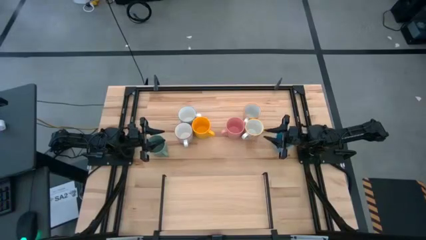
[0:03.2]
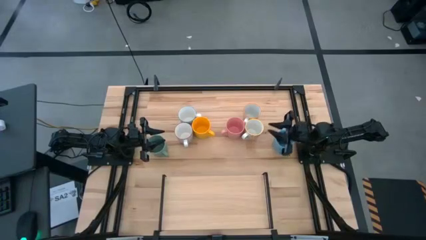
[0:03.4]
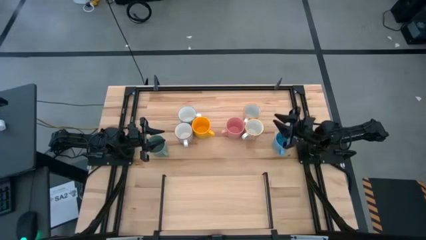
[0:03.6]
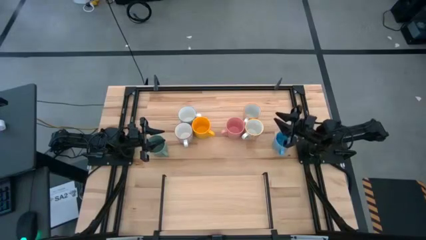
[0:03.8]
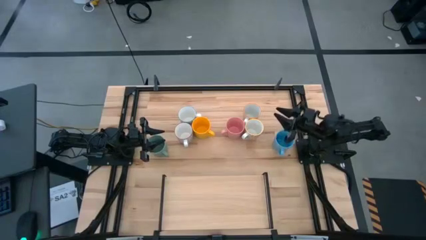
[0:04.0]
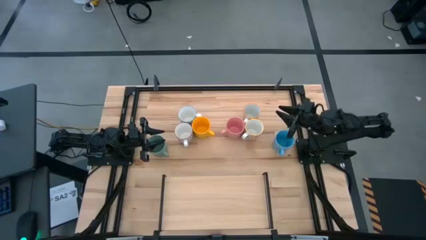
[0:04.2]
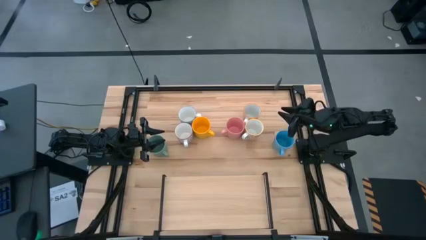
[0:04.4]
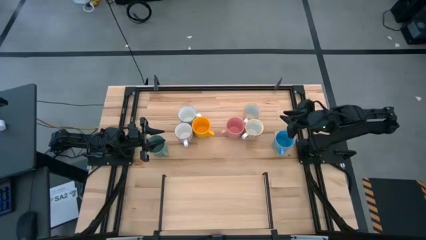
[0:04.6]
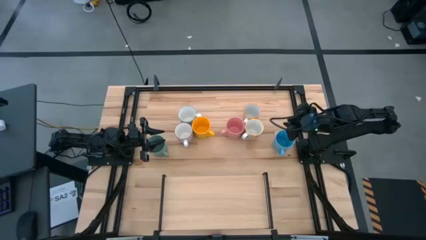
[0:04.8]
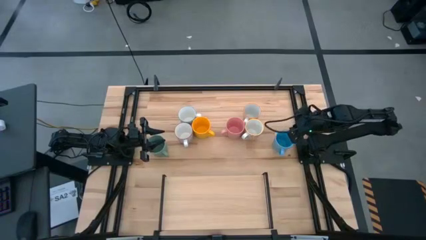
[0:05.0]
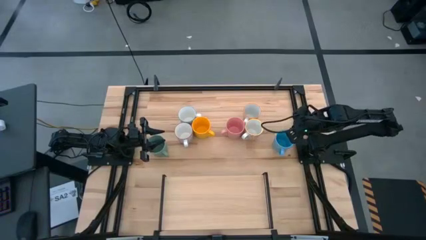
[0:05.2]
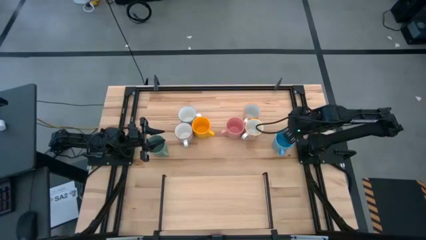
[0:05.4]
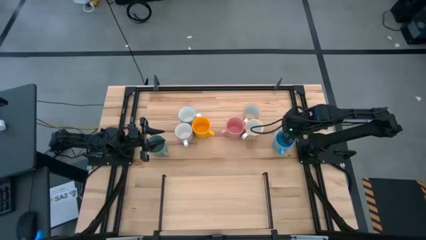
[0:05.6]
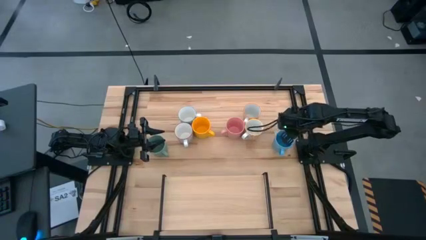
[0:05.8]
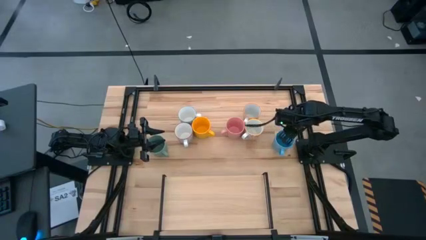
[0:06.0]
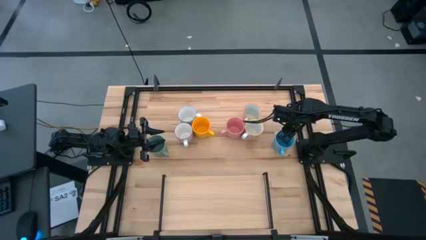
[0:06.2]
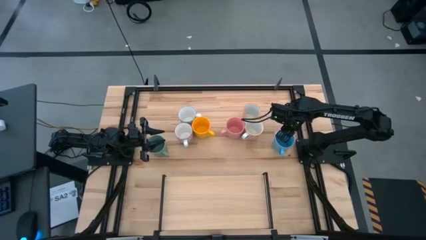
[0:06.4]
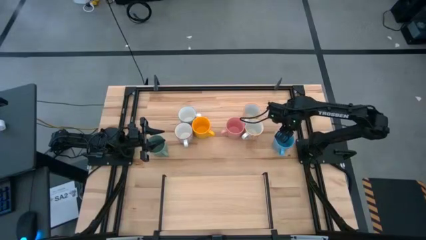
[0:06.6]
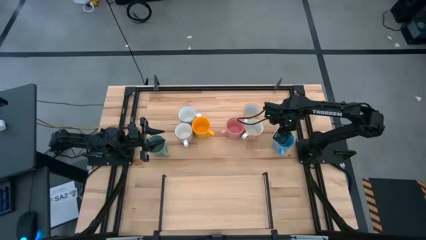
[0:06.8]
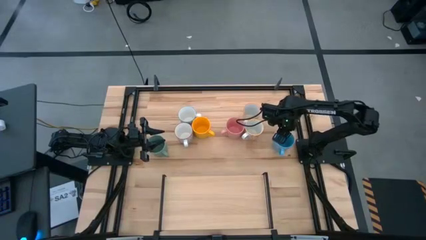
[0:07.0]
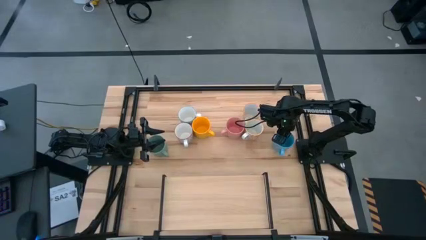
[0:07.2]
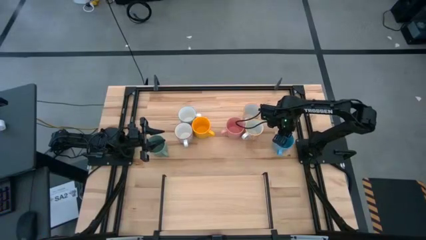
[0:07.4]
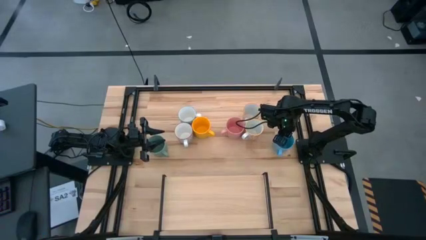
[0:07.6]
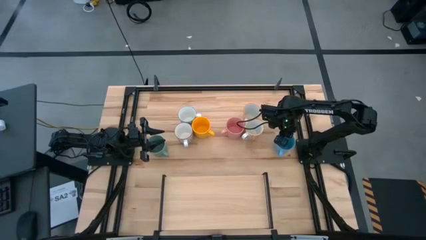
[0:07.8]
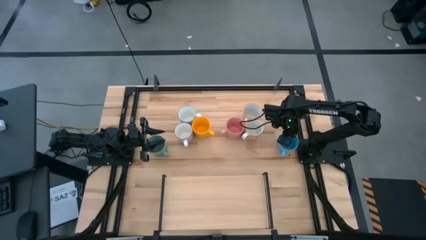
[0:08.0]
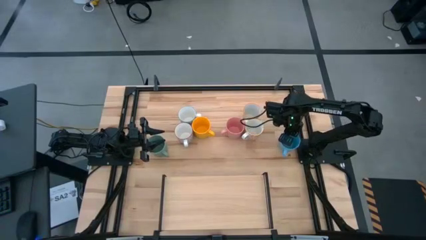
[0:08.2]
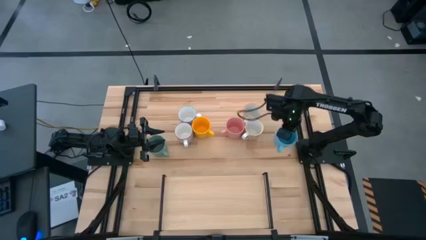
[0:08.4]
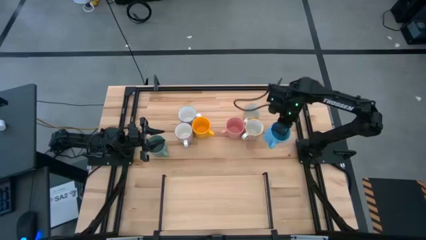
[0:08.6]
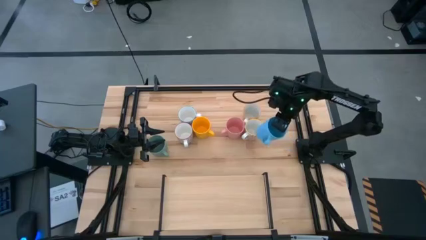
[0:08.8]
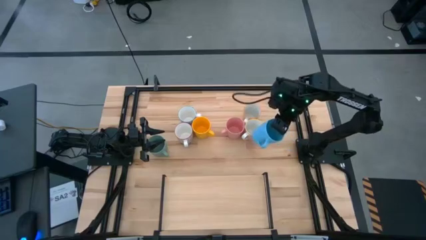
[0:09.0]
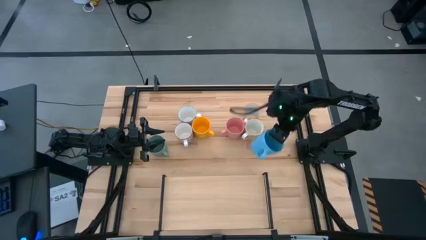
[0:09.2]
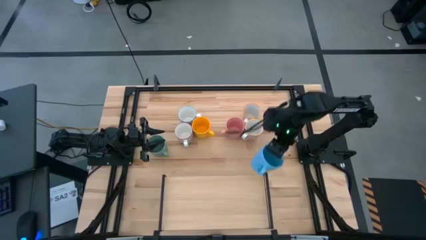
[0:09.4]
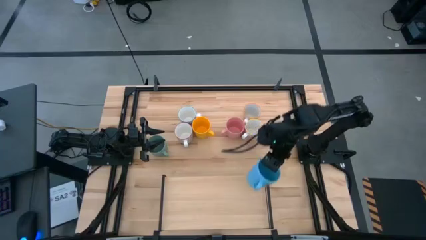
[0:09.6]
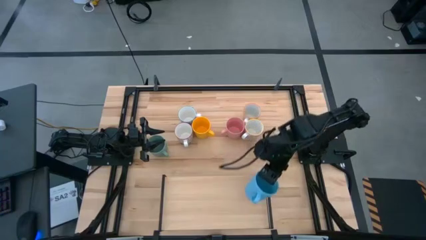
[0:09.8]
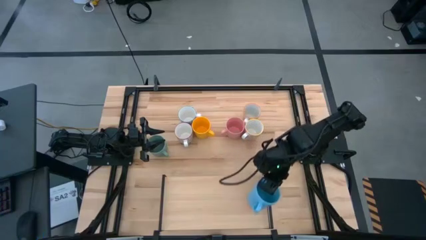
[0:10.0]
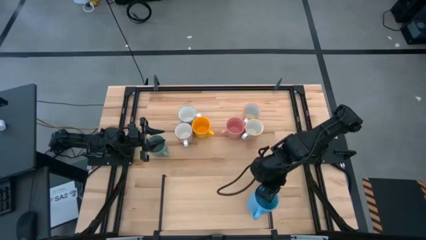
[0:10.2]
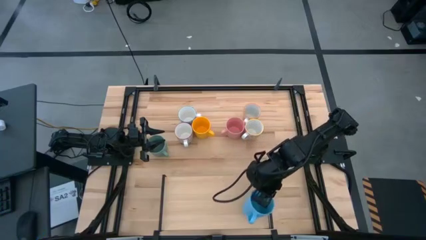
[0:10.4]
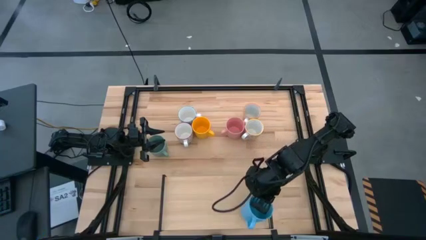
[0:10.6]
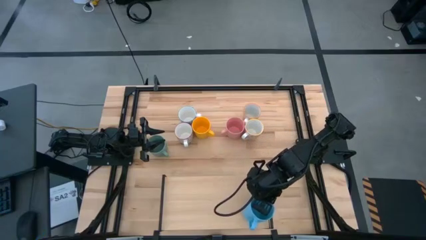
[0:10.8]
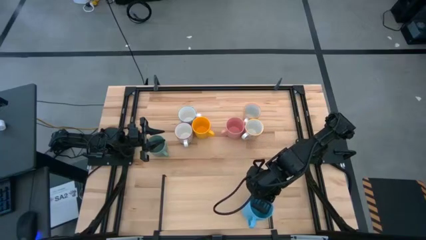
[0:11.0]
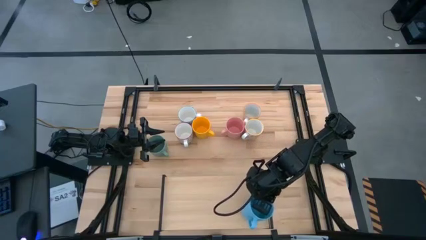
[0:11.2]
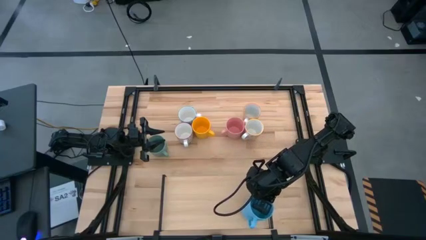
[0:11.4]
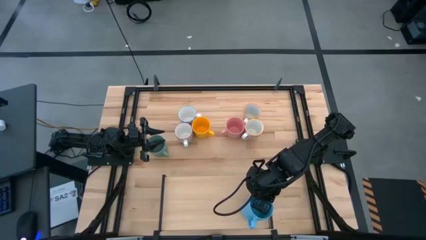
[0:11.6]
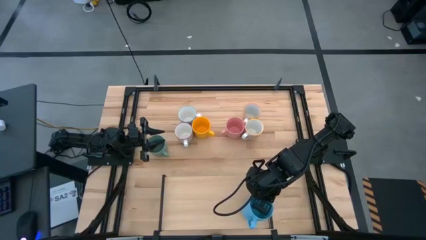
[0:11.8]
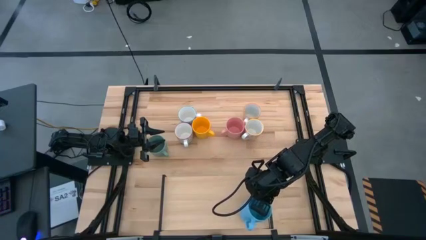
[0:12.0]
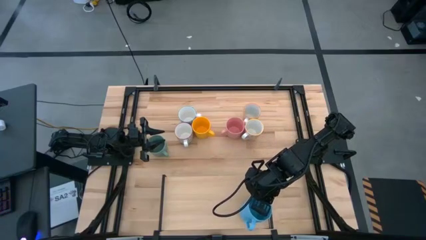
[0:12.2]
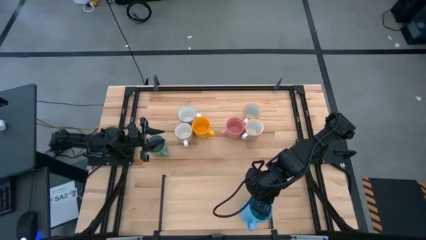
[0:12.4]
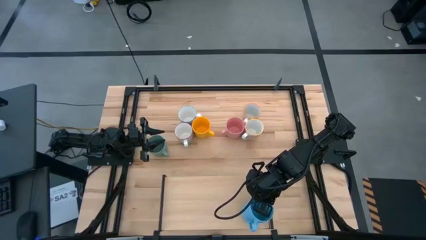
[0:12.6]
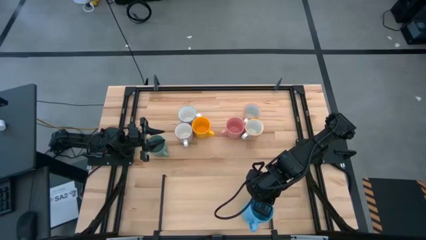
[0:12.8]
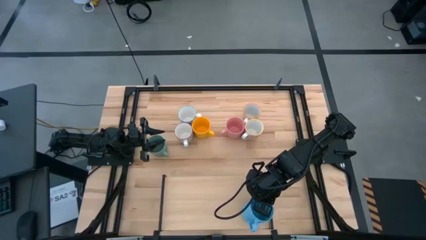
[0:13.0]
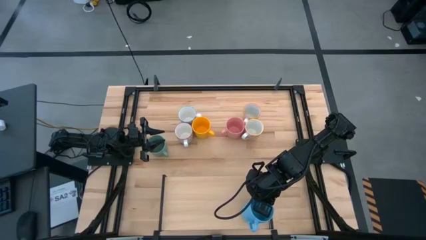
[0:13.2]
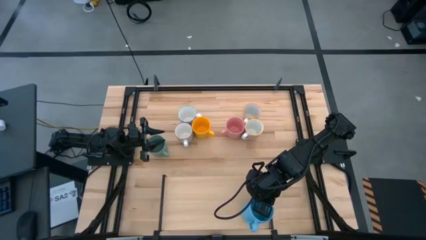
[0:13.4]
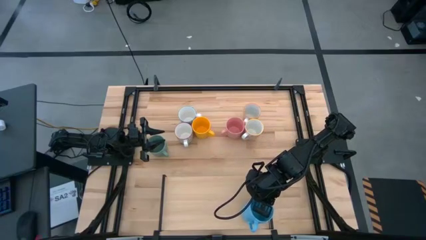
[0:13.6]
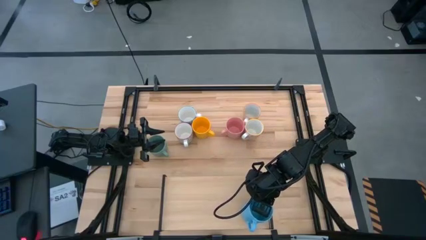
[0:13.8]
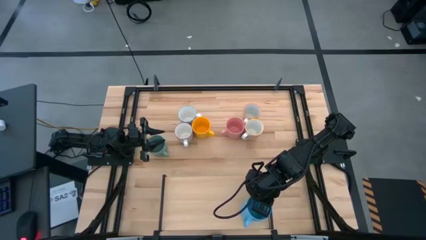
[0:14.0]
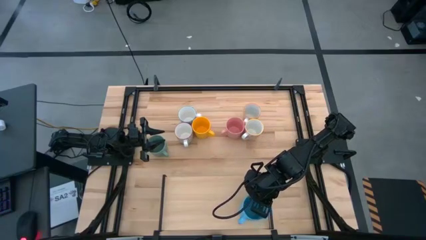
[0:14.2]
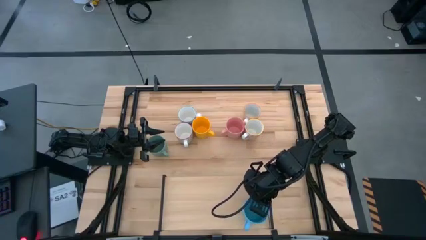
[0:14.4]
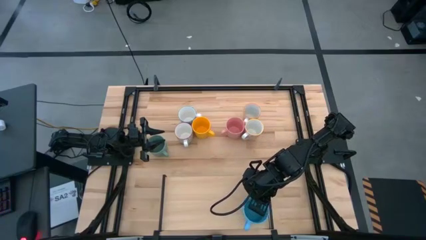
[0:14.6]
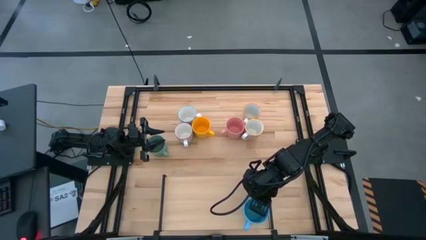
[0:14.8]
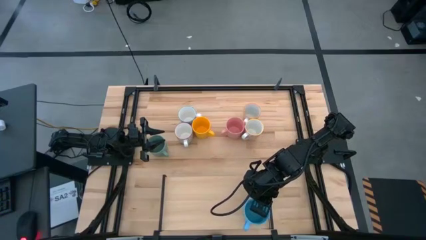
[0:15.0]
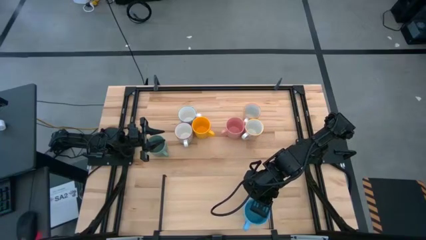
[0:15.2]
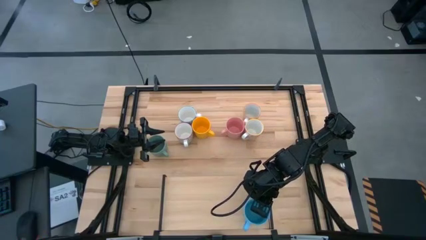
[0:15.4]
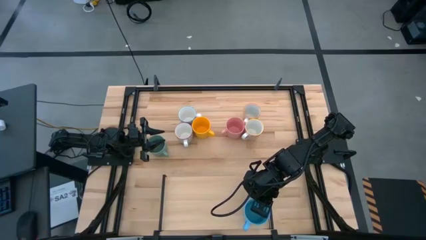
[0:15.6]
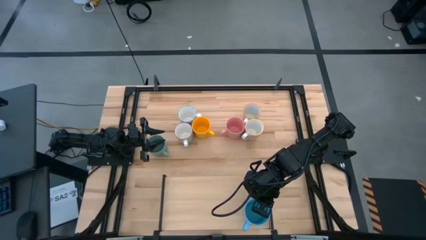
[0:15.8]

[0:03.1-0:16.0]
Task: Place coffee mugs
Put the light blue mug on the shelf
